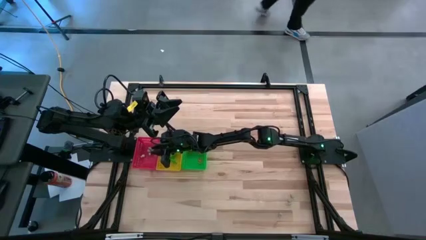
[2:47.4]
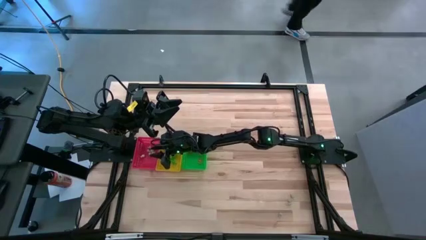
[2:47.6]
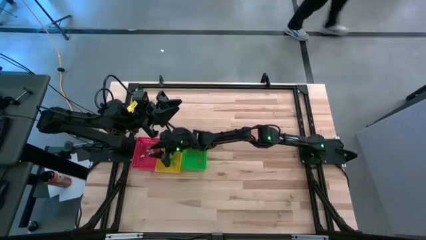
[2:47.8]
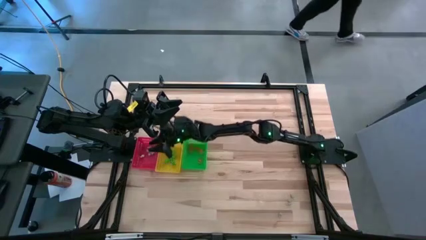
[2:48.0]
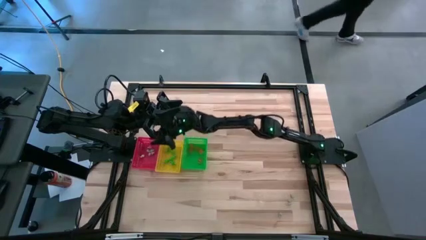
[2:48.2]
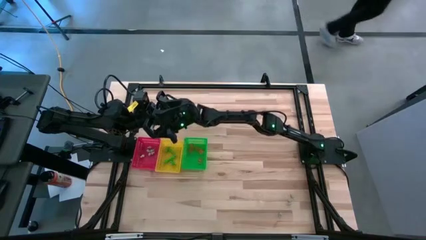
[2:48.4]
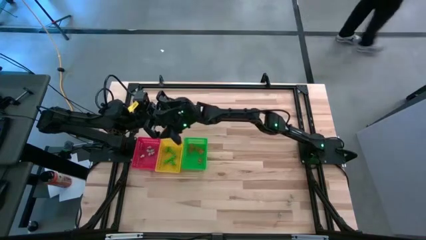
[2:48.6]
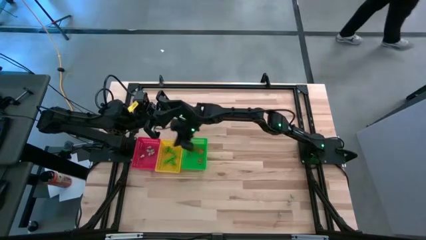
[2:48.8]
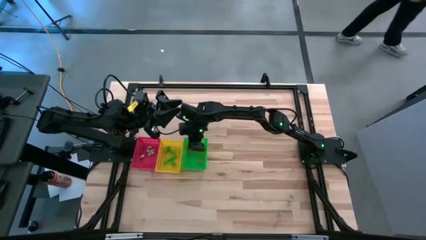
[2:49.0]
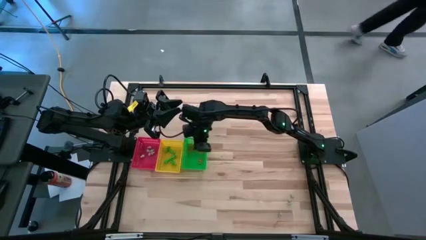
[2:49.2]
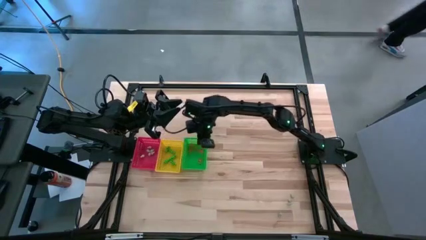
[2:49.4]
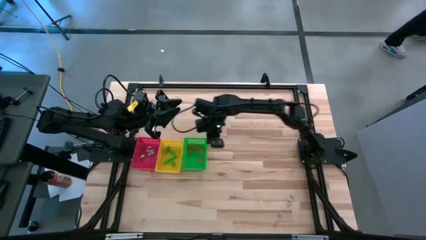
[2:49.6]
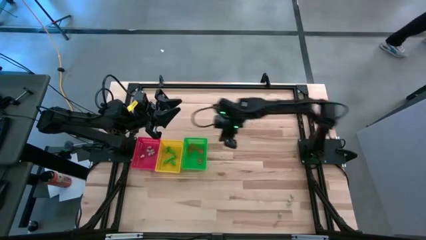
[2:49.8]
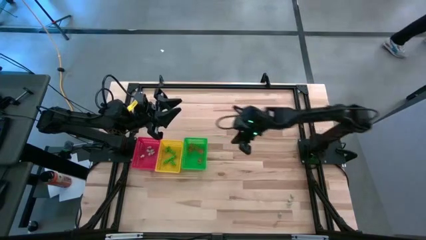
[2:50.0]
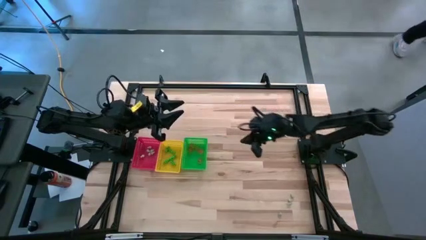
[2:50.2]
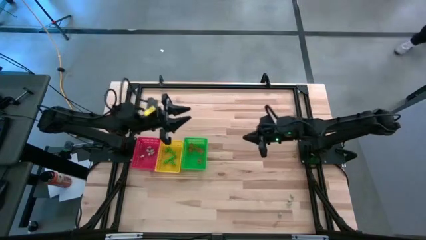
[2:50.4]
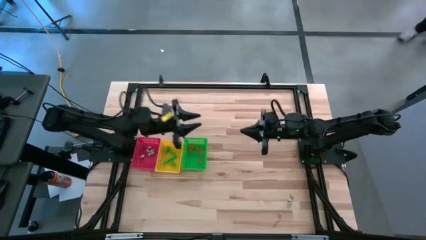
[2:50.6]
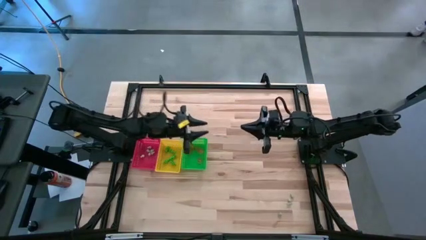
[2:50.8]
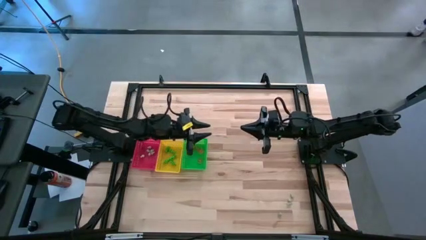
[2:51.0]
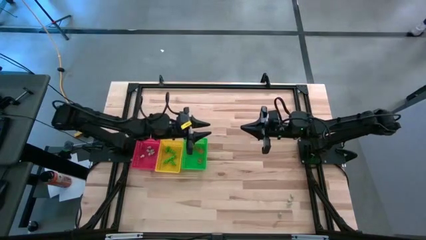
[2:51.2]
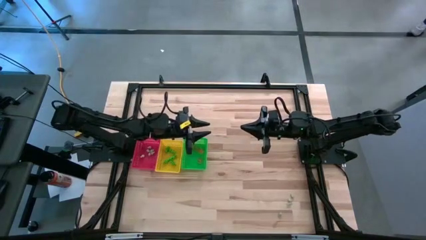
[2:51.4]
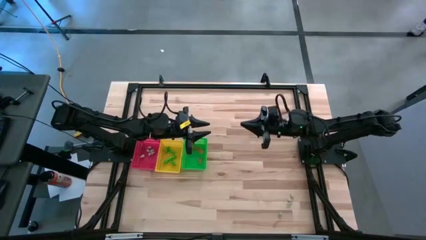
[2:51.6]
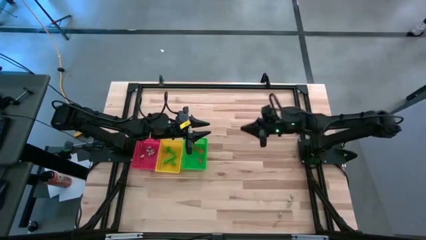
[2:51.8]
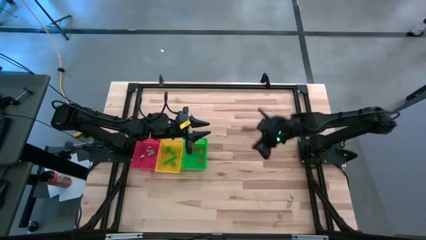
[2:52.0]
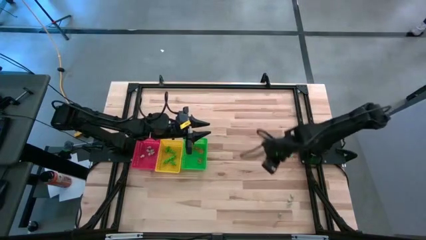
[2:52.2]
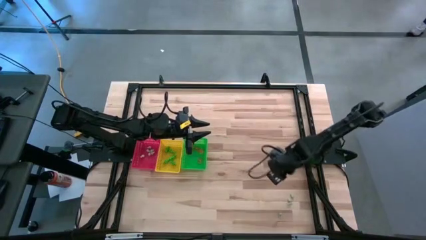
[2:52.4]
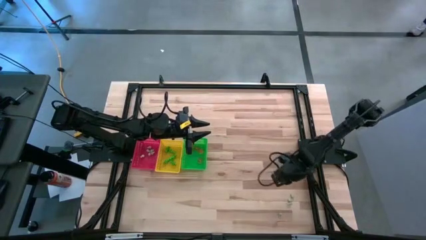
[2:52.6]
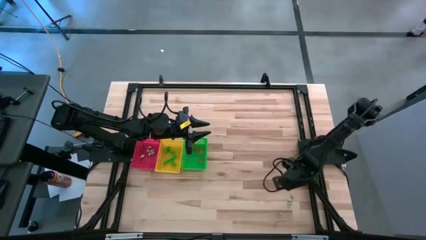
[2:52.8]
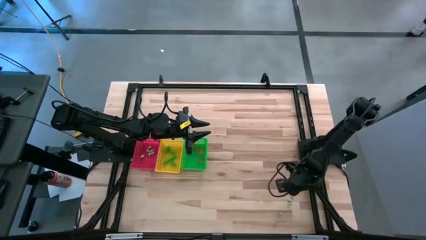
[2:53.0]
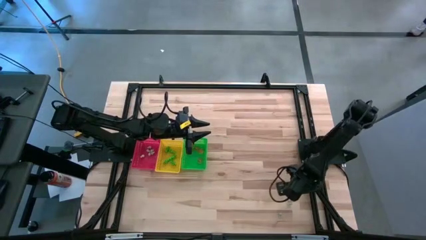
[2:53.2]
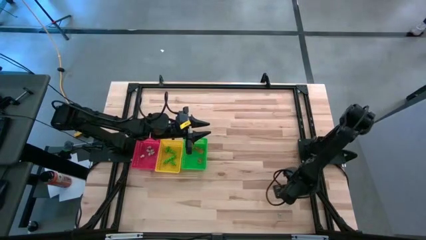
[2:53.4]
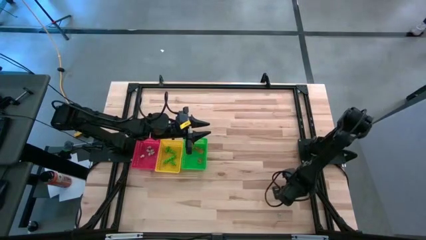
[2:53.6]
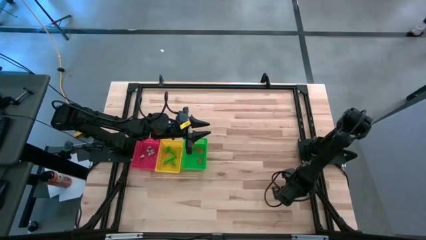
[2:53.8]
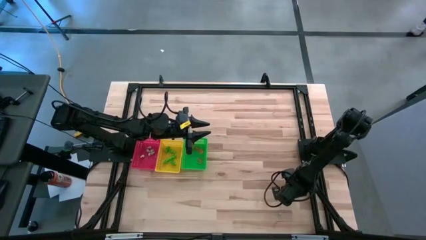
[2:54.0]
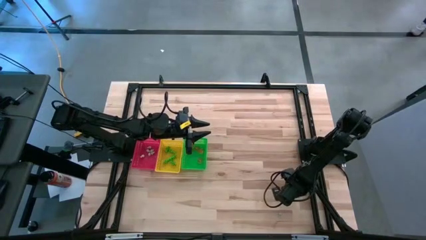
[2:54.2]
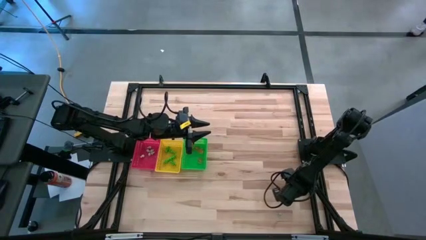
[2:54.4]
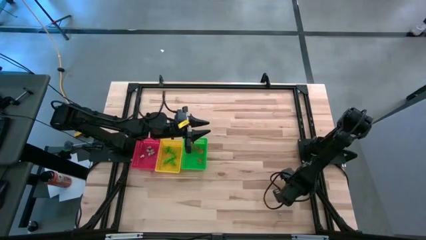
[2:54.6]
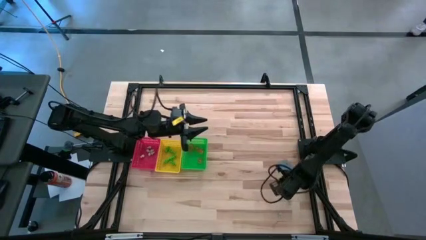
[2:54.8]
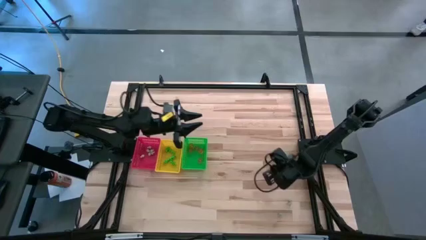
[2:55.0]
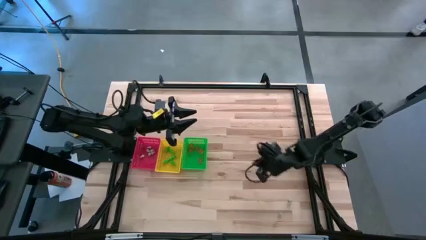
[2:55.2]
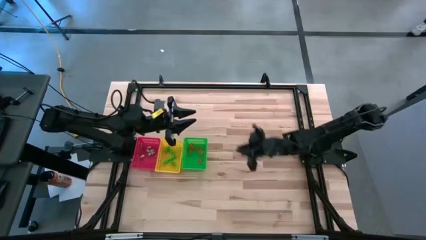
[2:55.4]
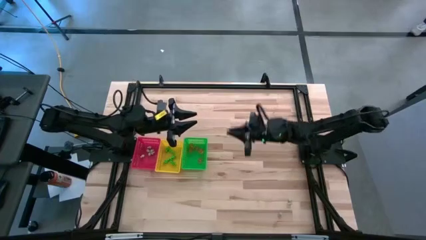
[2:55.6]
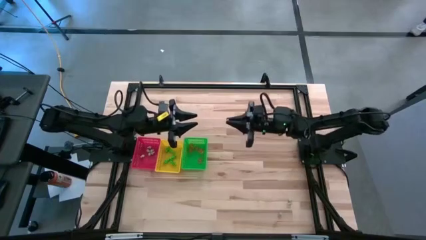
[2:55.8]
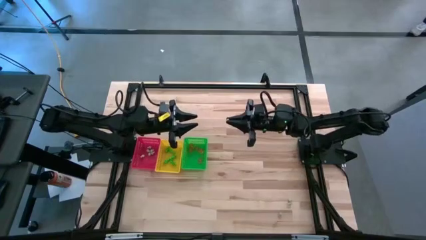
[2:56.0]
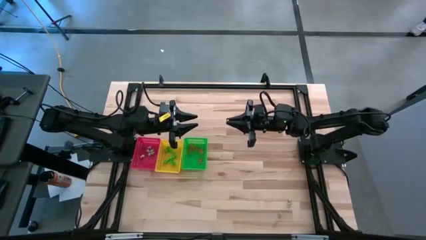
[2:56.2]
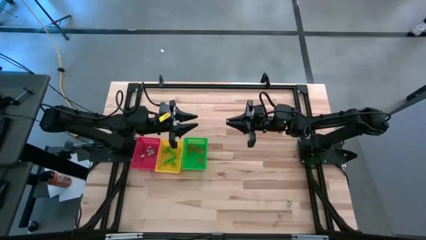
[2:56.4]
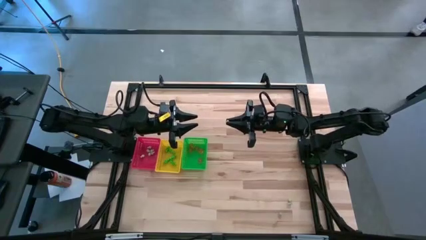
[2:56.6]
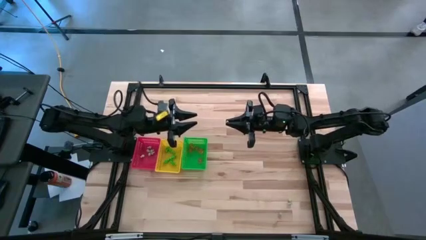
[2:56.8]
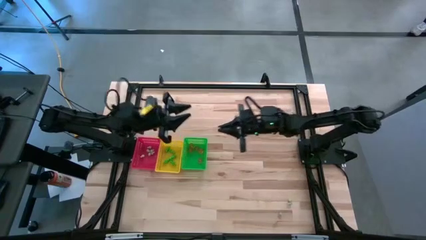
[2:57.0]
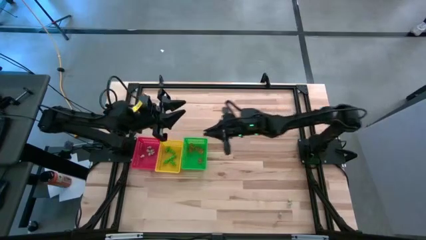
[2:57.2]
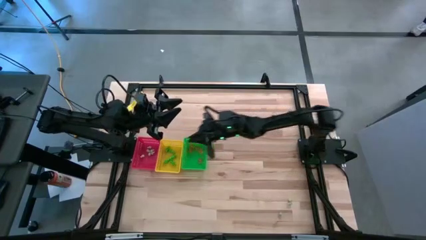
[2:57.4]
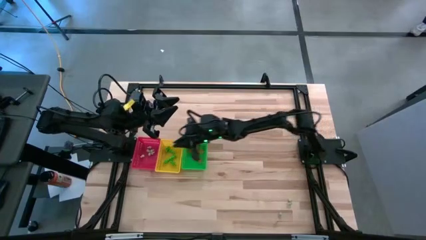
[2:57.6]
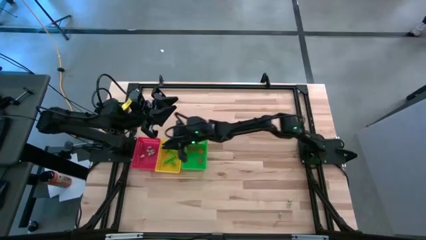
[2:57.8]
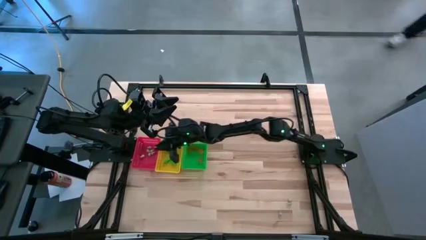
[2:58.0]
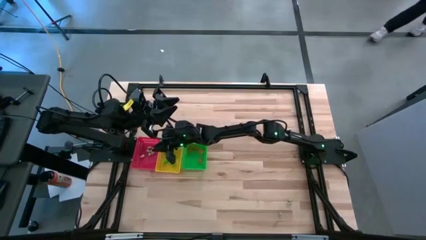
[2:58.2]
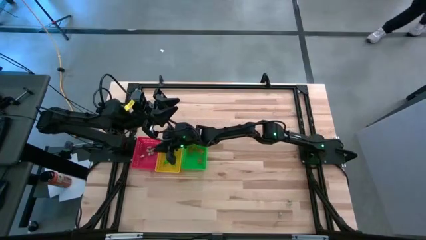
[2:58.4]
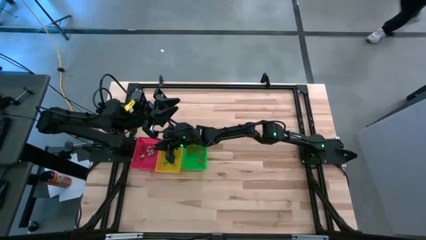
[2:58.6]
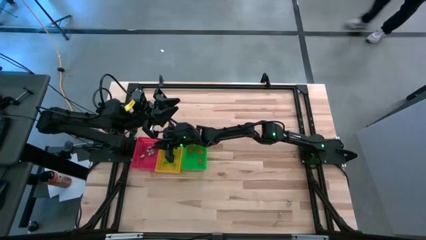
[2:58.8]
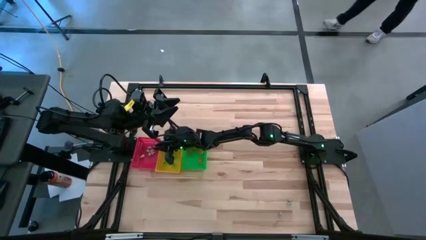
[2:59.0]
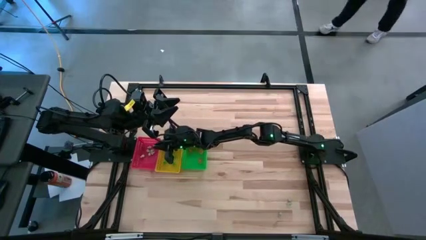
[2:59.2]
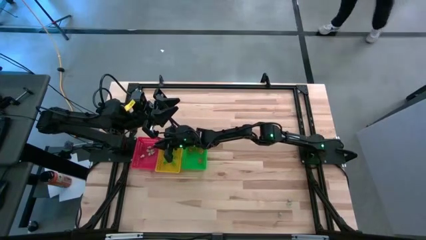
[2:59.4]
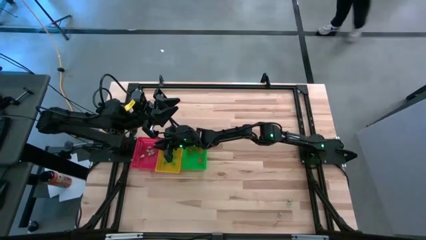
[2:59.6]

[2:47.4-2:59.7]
Task: Sort Halloween decoration
Put the white skull toy into the red bin

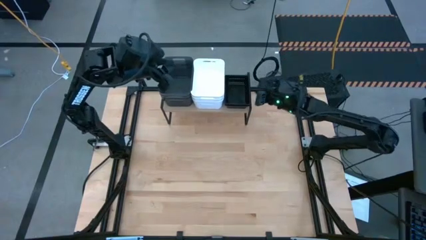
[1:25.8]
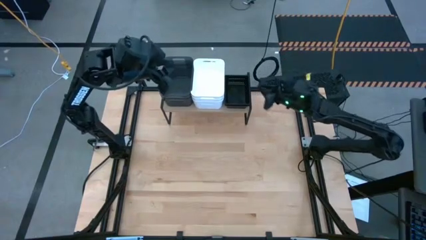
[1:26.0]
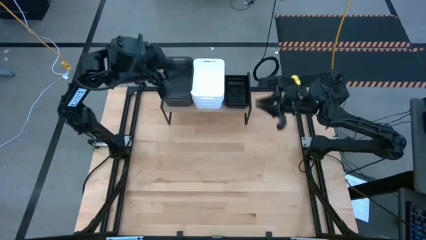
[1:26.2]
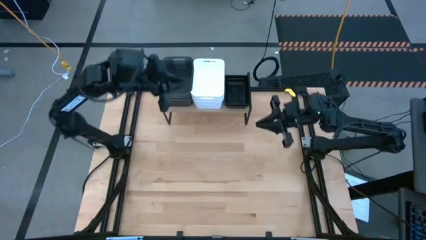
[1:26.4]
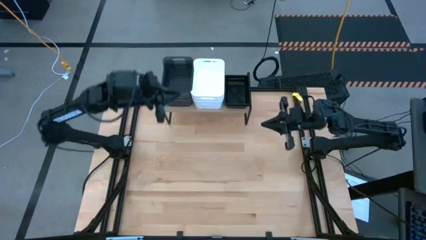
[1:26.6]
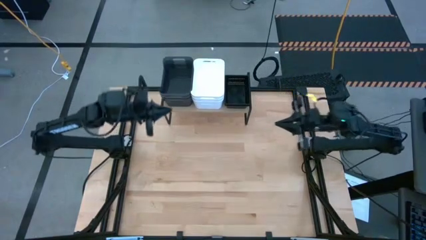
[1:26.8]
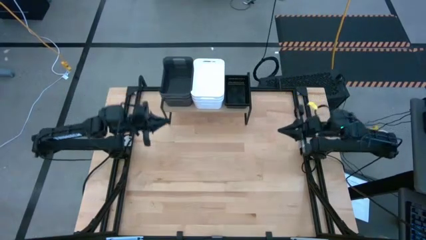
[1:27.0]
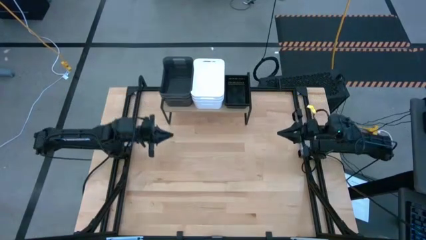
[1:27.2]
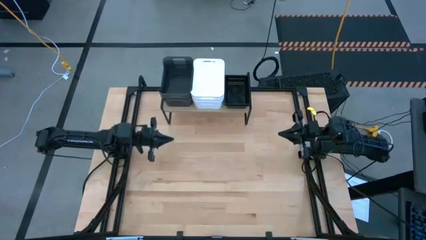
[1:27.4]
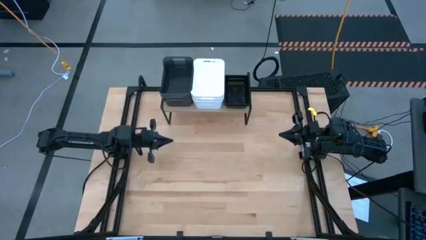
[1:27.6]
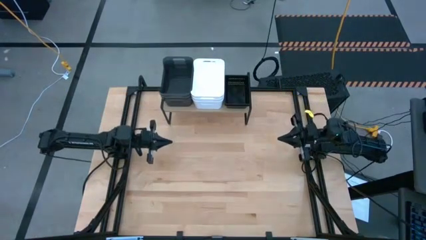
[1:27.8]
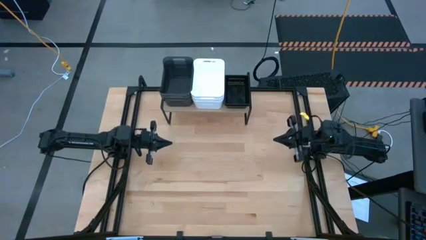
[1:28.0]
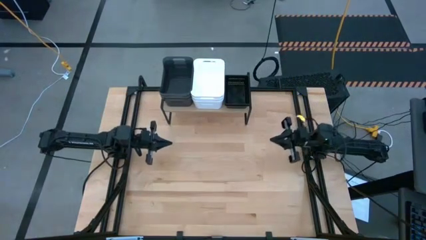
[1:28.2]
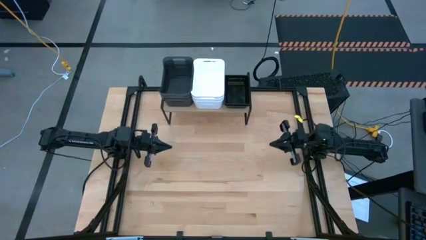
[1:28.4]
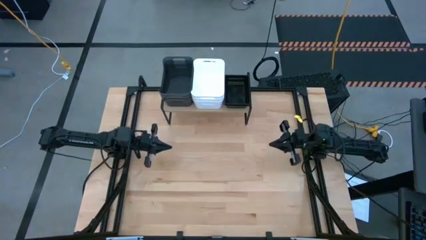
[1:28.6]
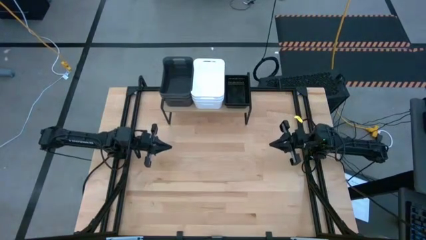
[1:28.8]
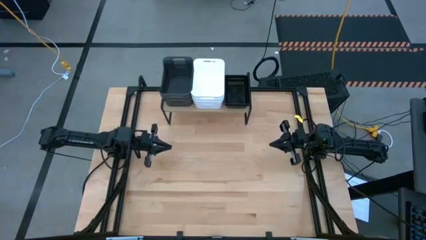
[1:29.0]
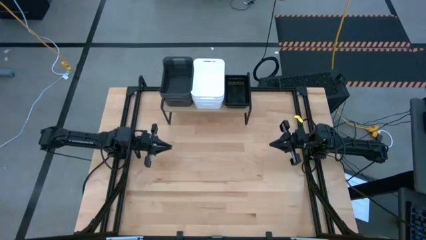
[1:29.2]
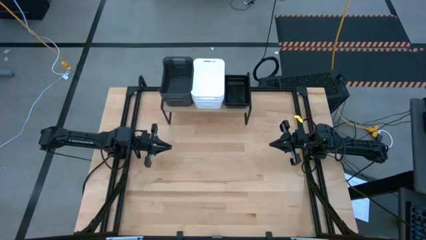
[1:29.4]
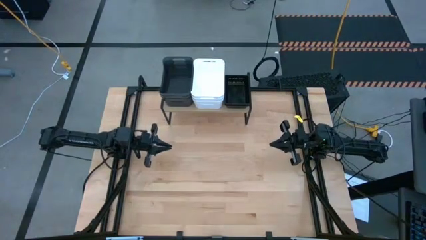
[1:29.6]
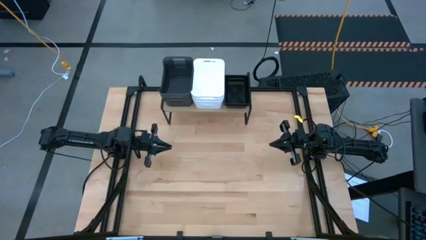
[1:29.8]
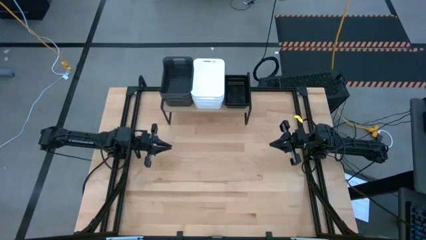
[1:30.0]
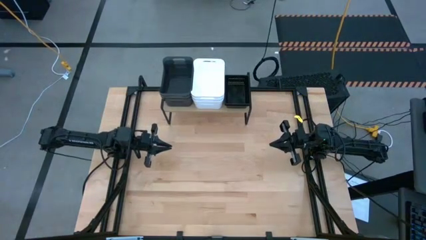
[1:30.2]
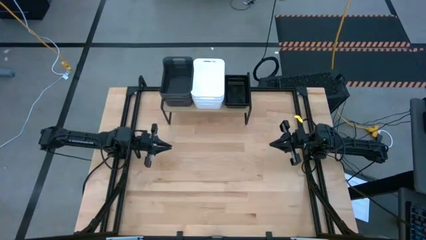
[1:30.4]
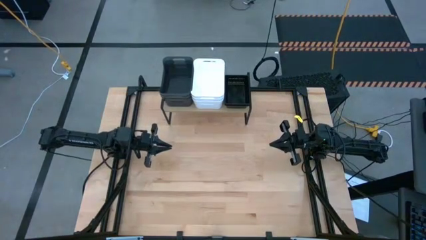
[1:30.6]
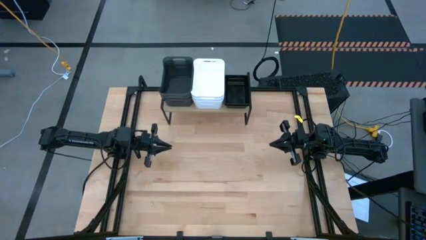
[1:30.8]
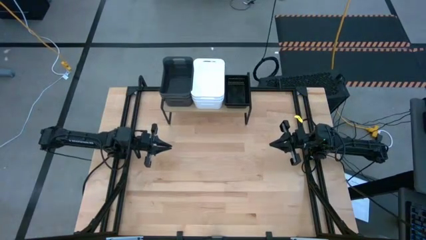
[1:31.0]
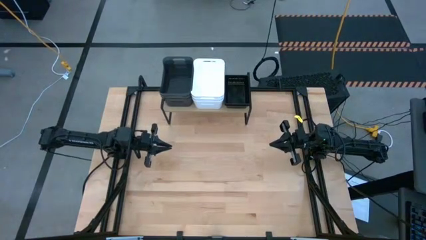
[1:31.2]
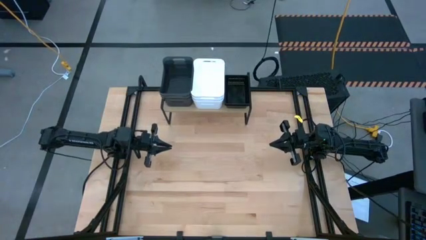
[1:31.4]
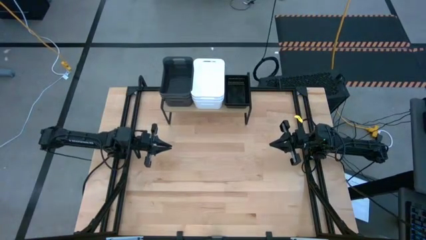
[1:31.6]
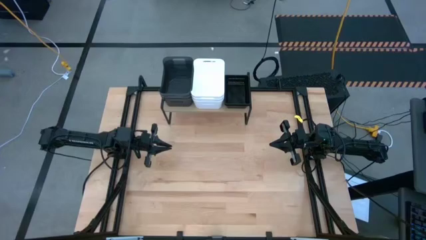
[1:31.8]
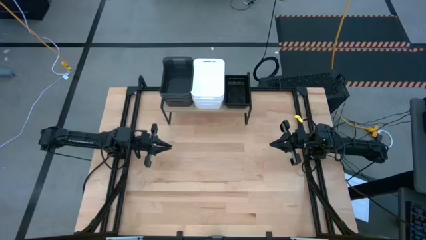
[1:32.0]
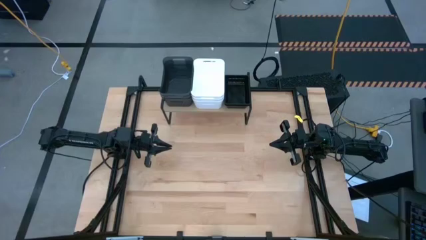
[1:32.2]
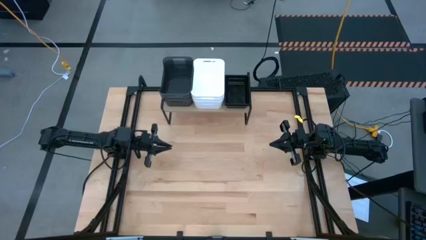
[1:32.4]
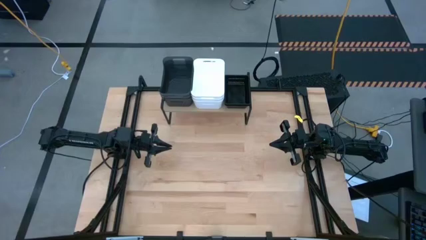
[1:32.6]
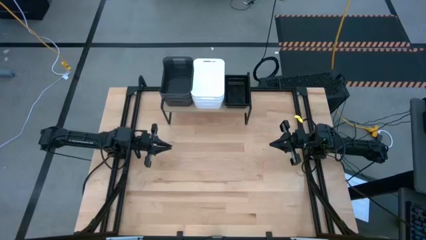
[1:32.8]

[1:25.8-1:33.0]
Task: Stack baskets on shelf by color
Return to Home Position
